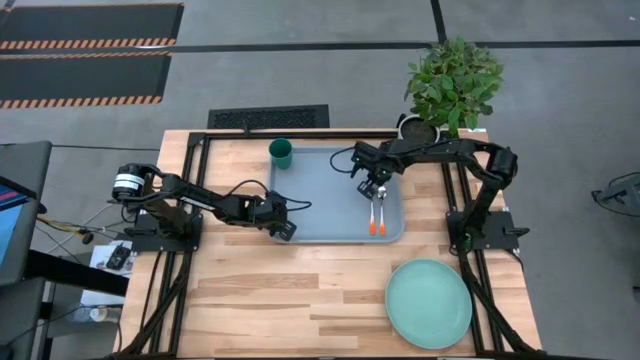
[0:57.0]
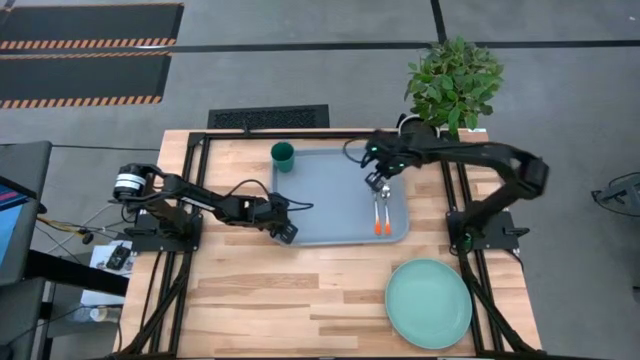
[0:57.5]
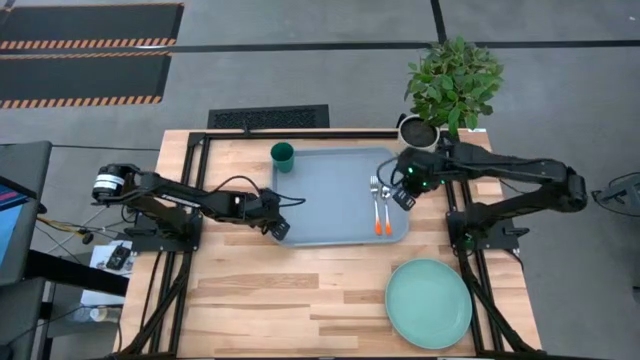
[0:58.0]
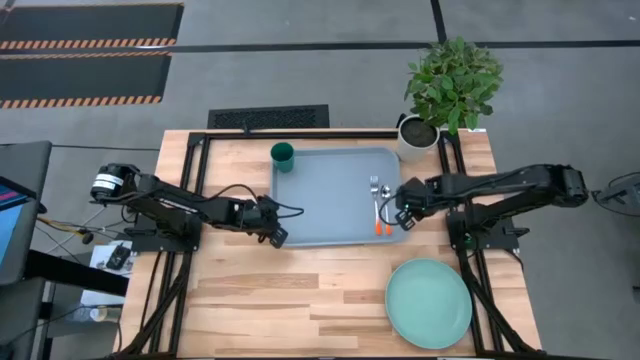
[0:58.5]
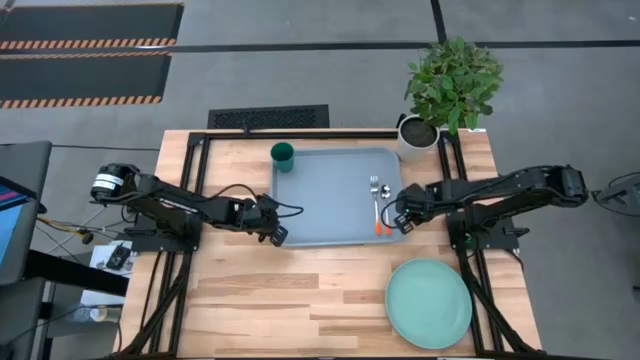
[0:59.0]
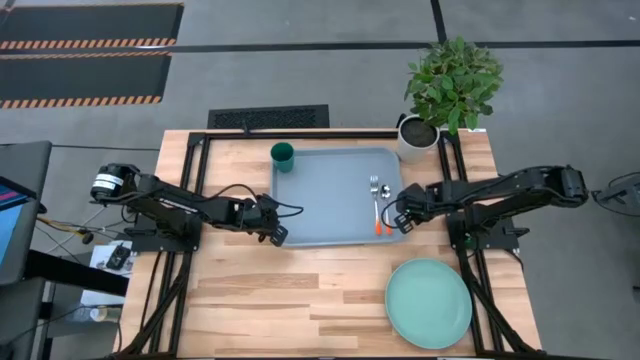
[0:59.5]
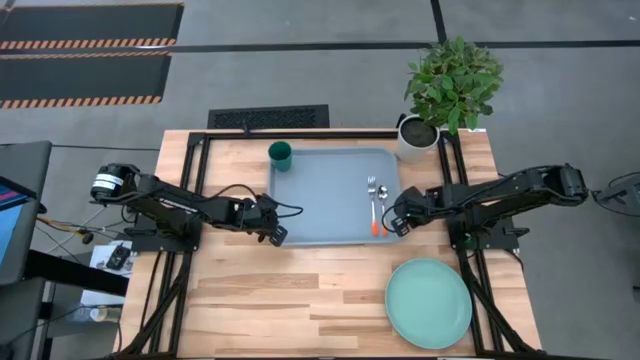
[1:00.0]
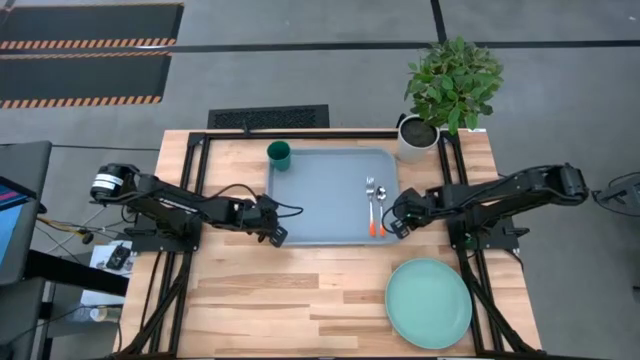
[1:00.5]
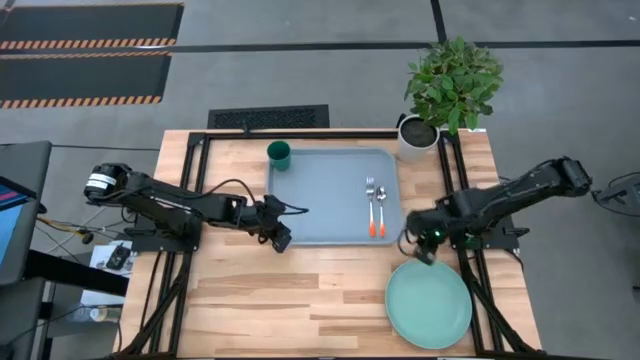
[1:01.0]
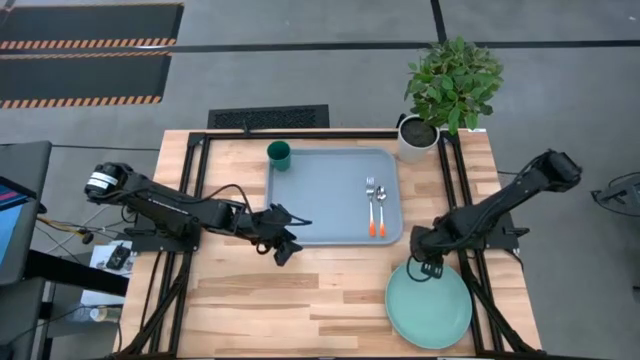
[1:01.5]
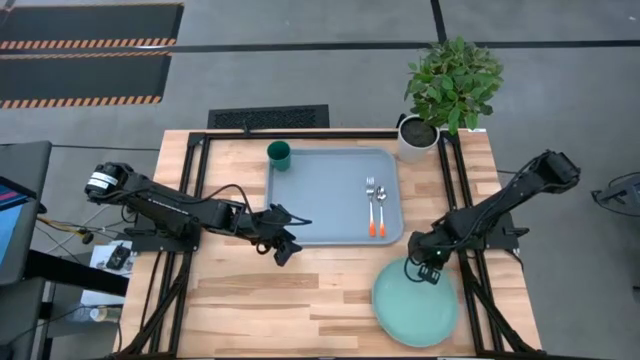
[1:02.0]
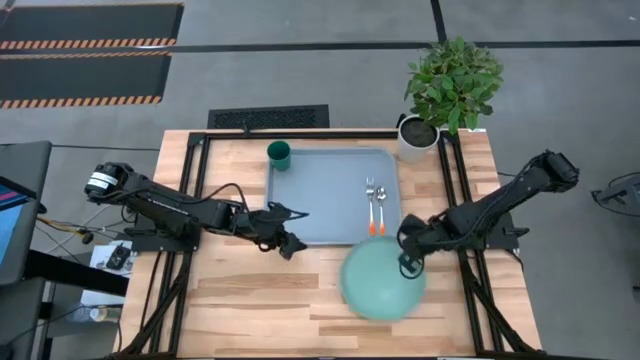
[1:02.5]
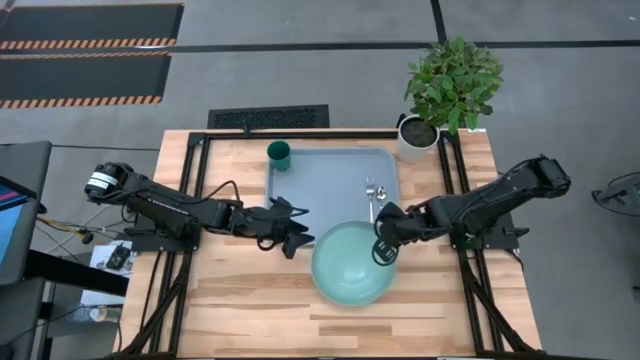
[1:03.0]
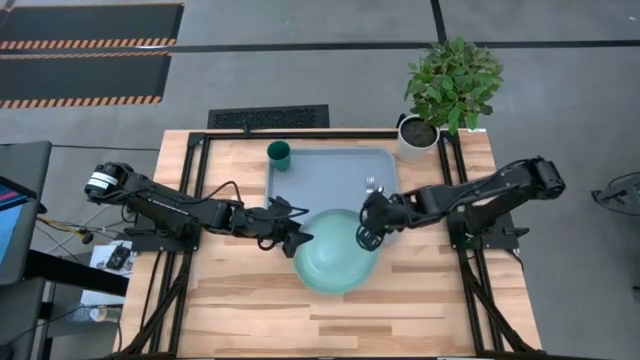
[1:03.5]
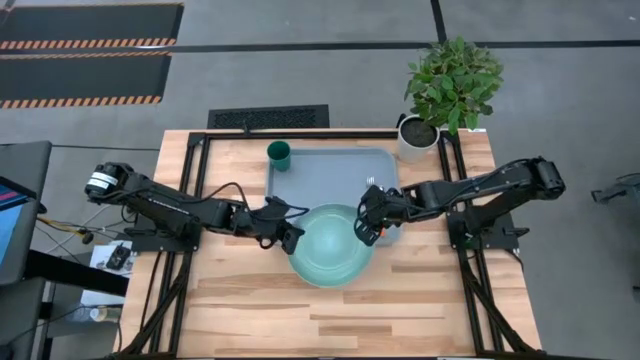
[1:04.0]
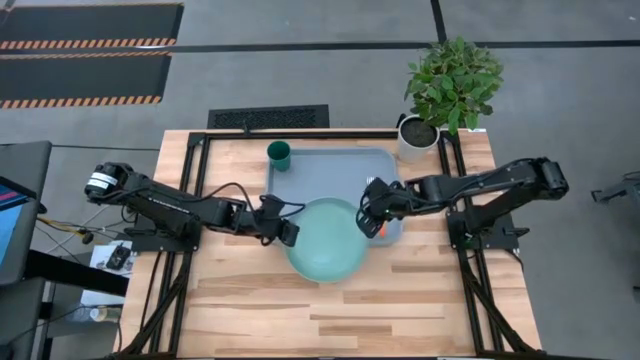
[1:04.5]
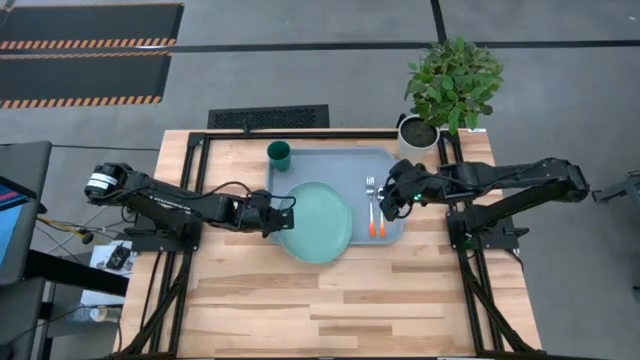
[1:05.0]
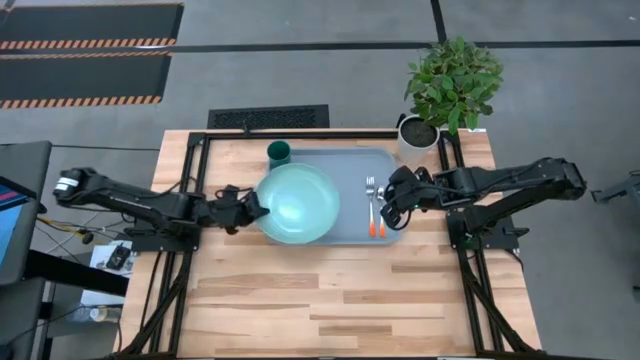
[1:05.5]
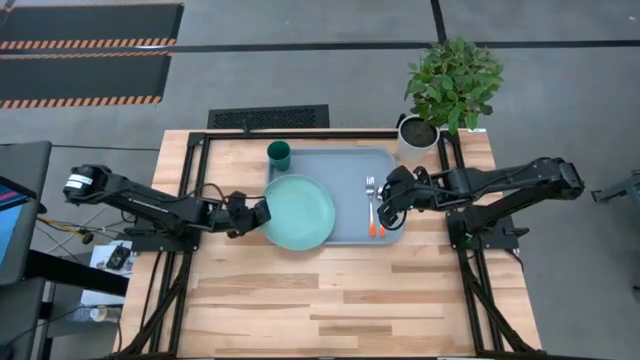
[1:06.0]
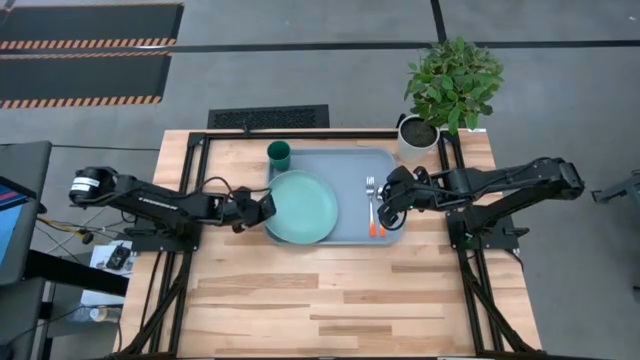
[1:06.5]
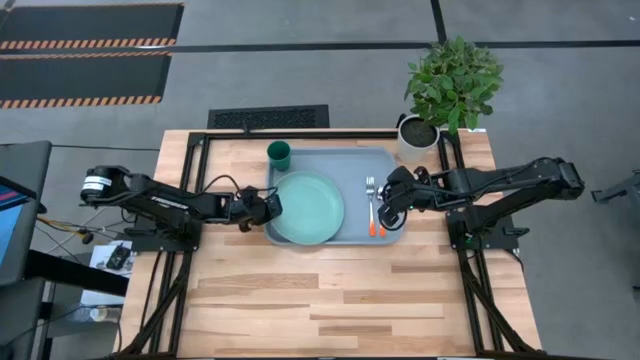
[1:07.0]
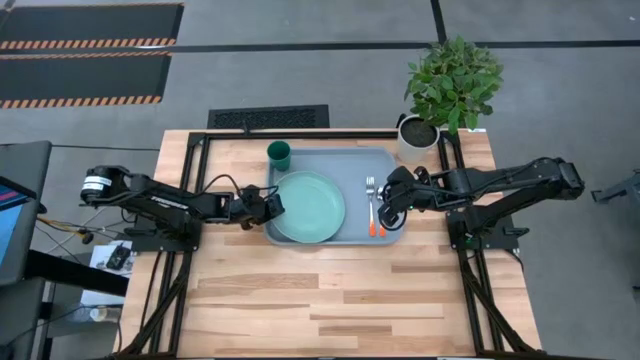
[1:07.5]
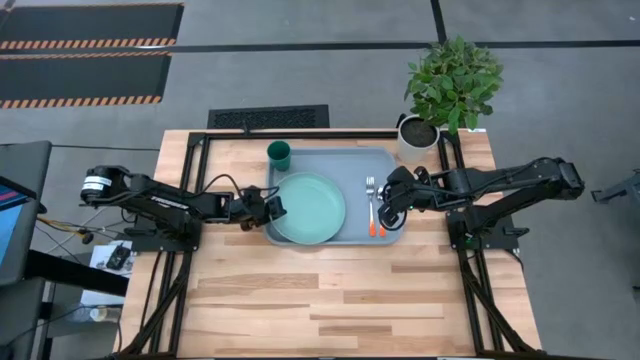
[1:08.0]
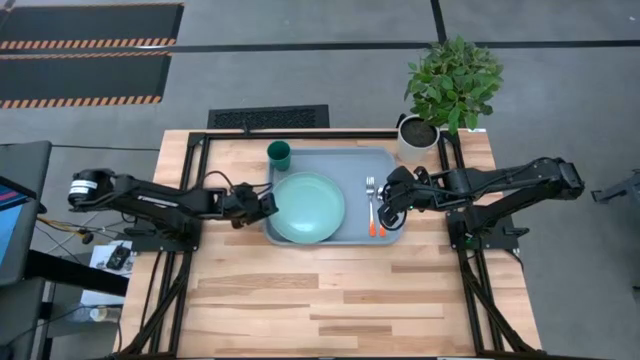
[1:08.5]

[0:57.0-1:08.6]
Task: Pick and place plate/cup/fork/spoon on tray
Put the blue plate on the gray tray to the left of the orange fork

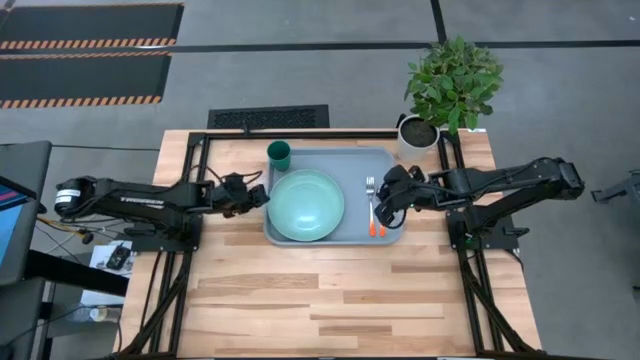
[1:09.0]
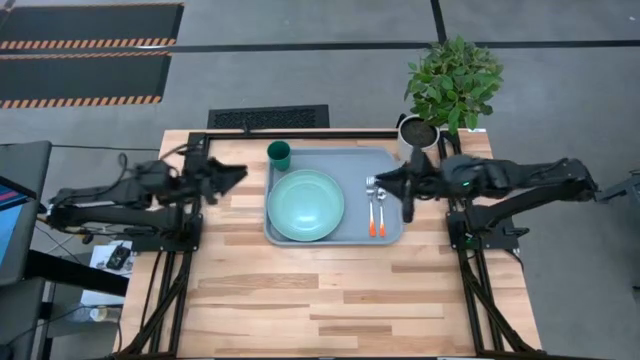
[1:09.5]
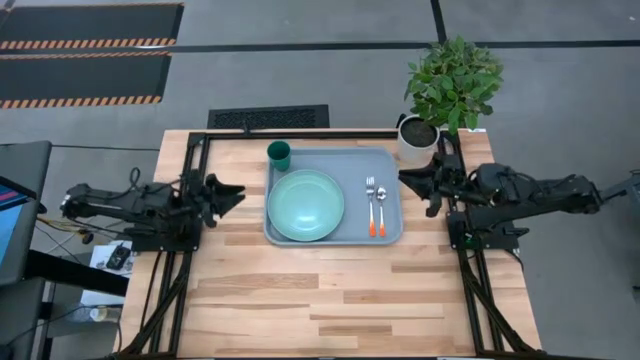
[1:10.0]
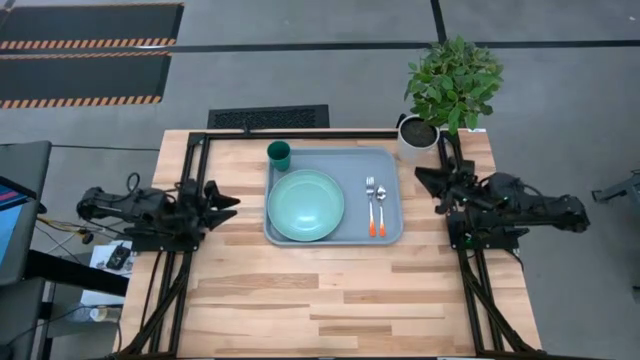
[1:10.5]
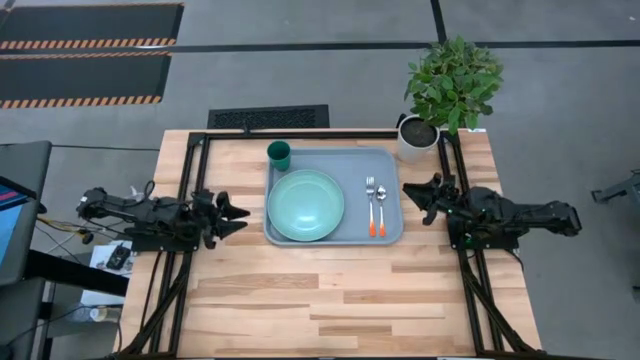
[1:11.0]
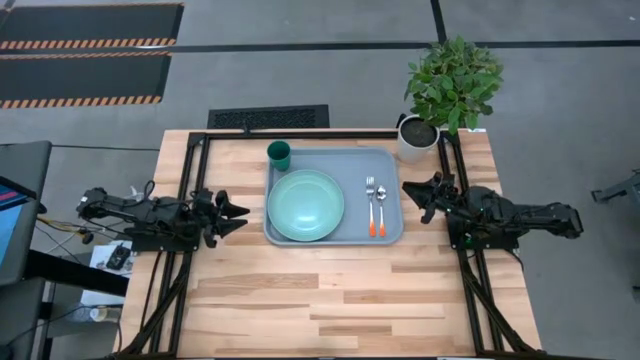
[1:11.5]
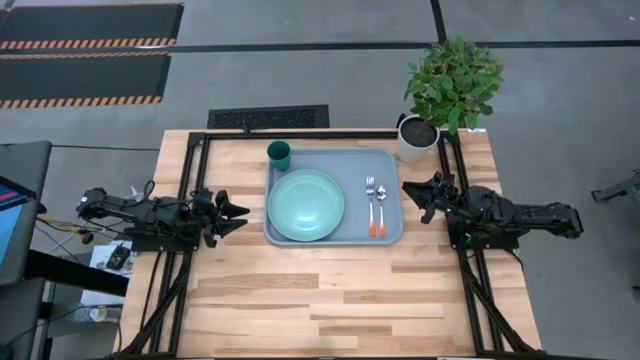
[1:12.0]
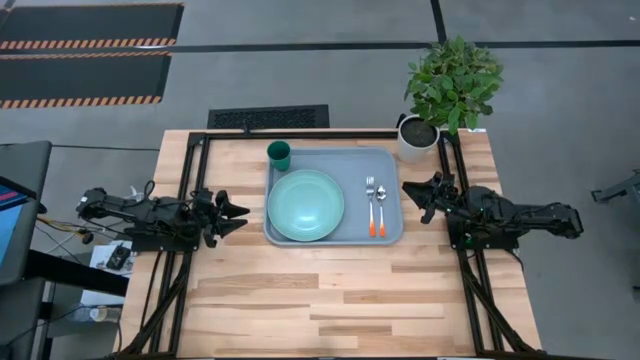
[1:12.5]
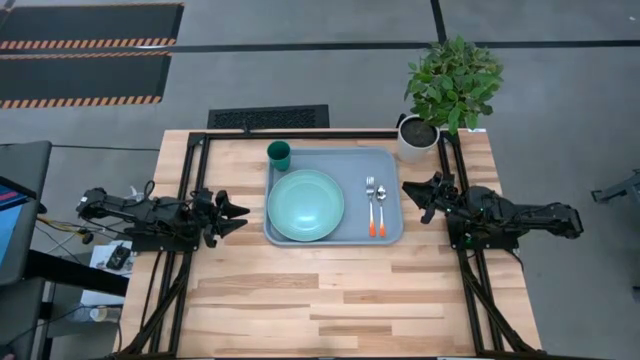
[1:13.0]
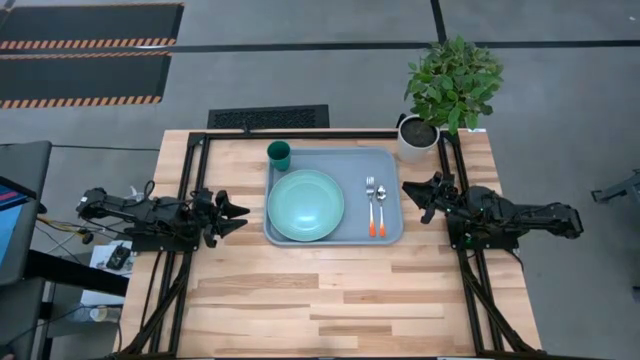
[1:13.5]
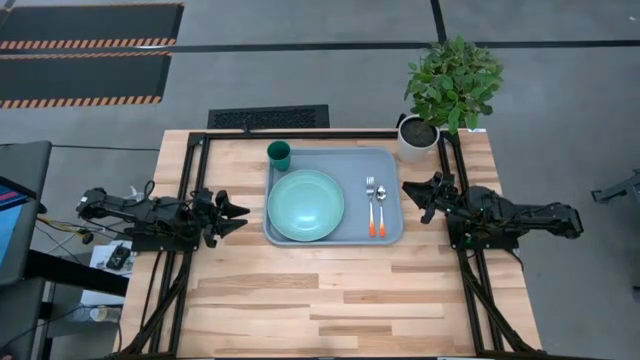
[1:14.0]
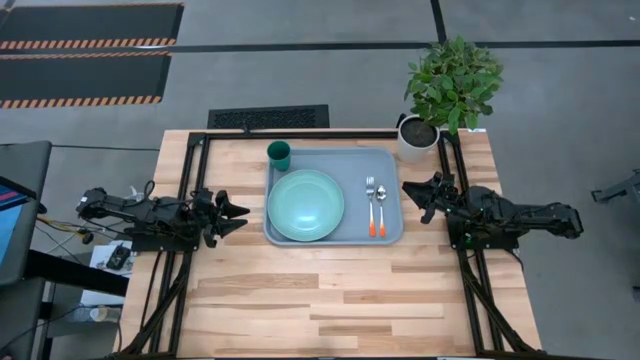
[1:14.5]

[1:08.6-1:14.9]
Return to Home Position

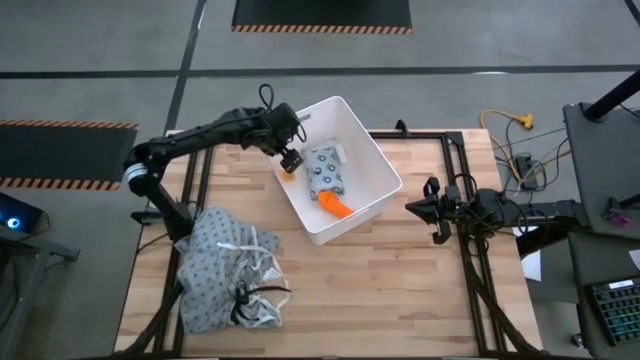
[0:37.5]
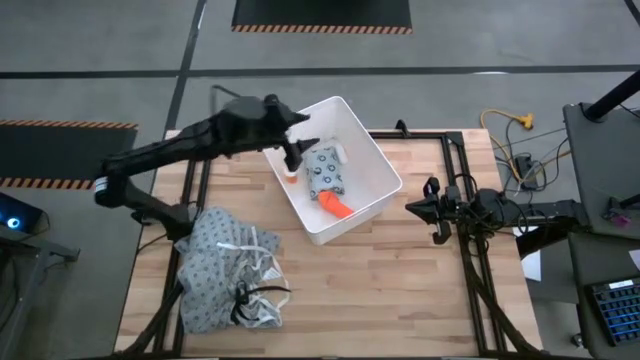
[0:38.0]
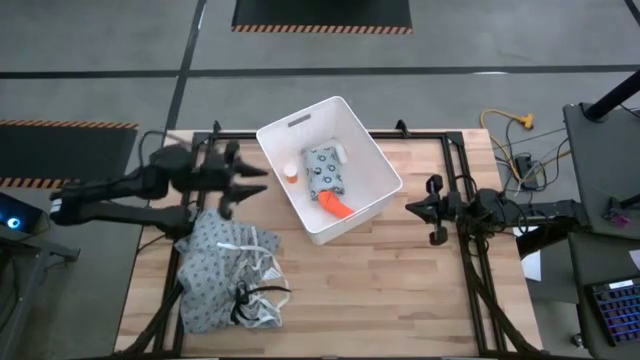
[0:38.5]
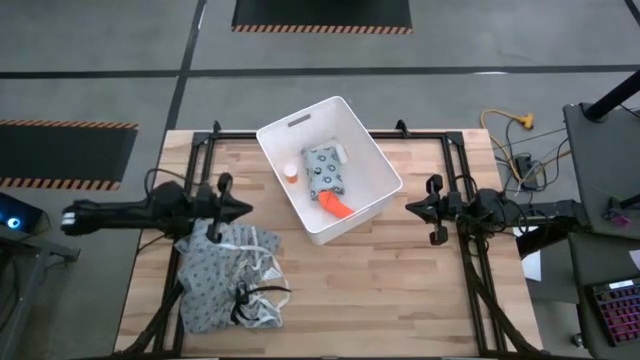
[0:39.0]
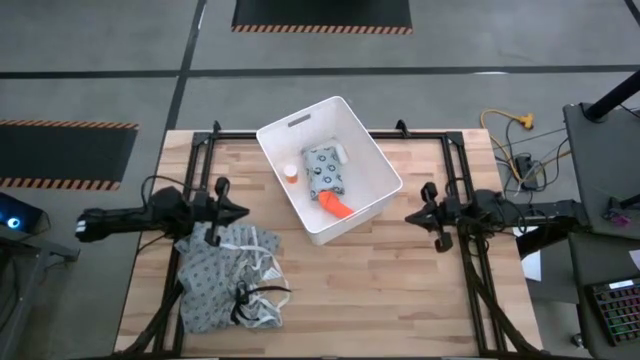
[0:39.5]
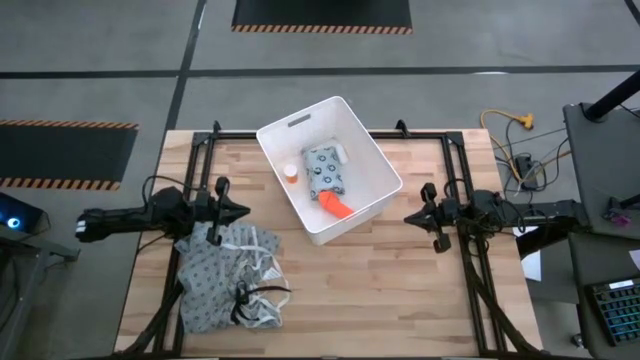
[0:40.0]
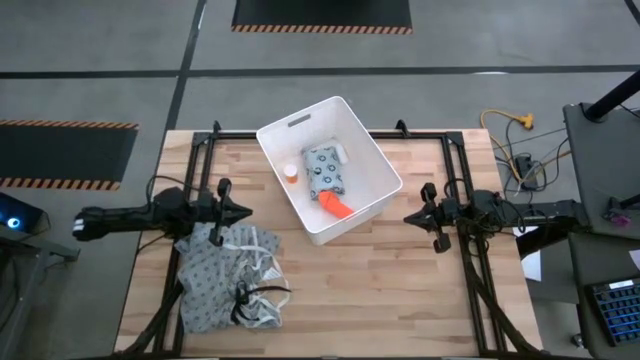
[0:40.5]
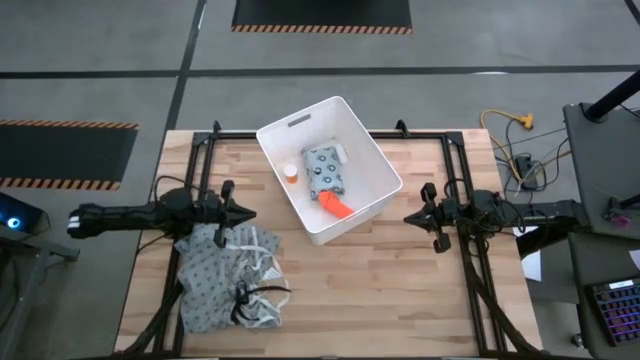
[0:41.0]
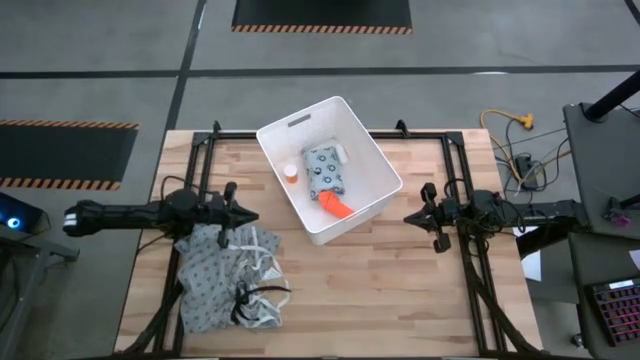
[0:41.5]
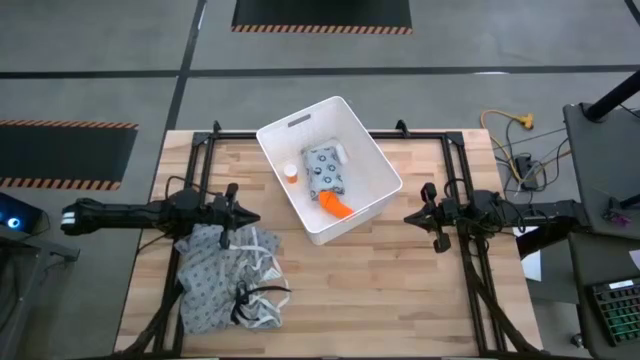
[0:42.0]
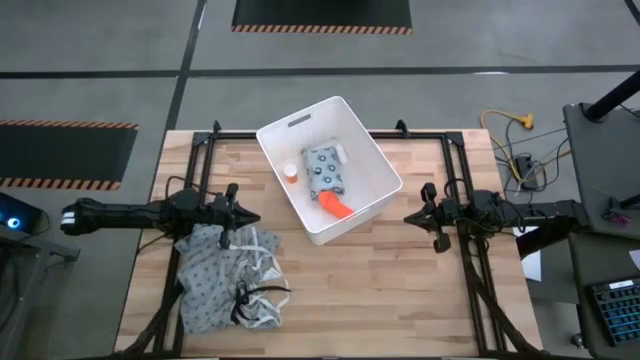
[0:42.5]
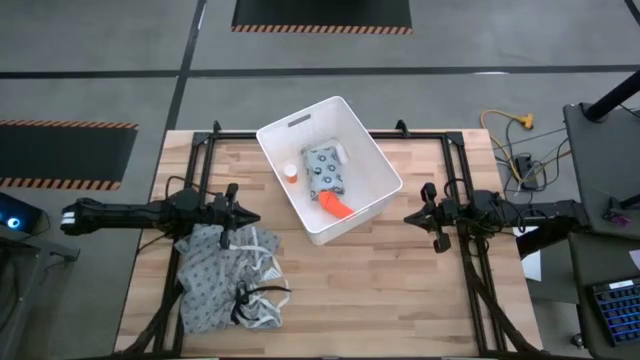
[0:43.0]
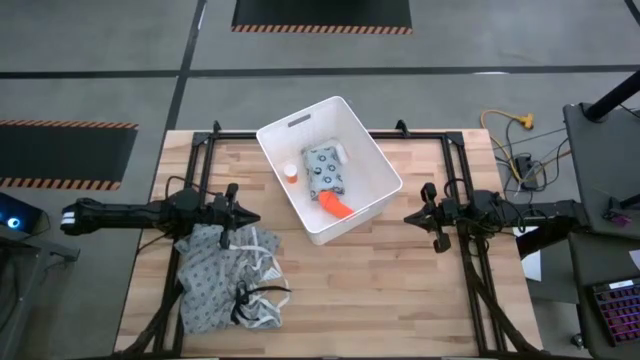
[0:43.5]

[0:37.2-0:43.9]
Task: Pick & place medical supplies in basket/bin
Return to Home Position
